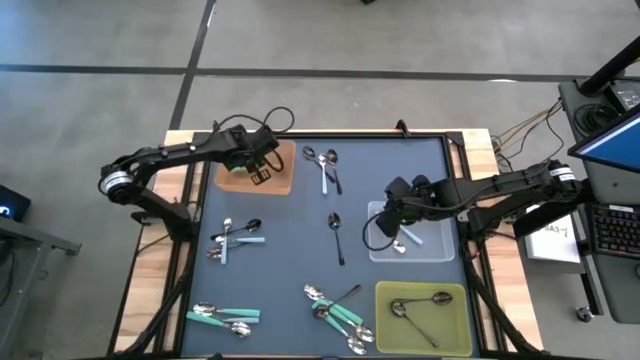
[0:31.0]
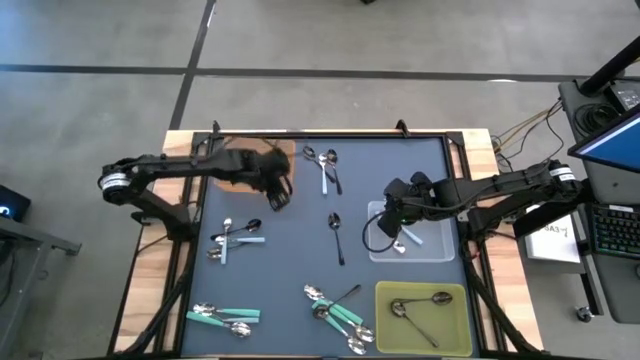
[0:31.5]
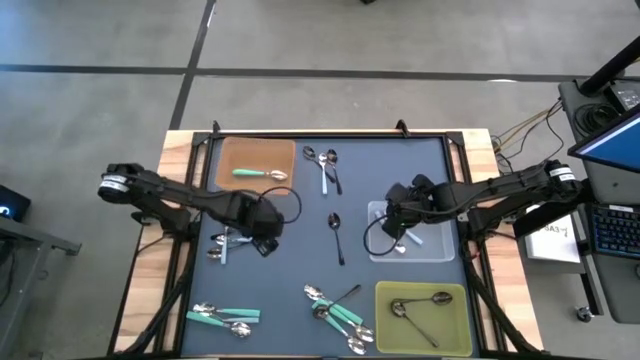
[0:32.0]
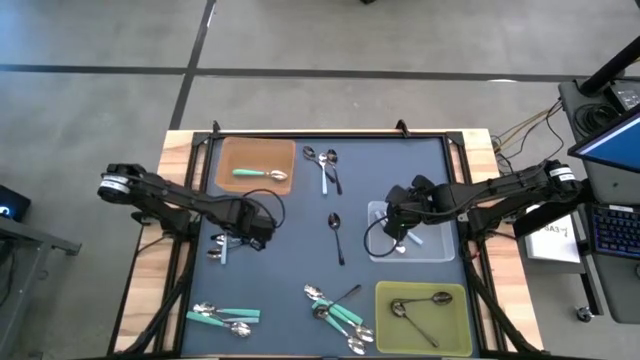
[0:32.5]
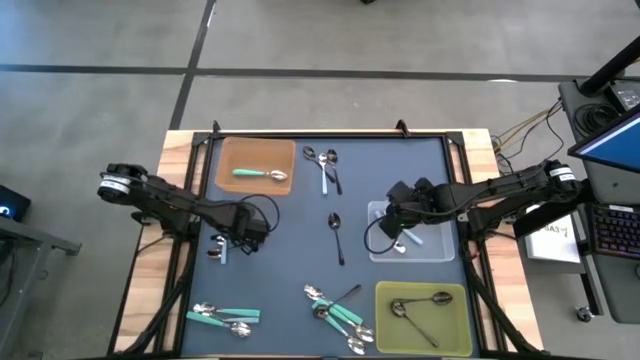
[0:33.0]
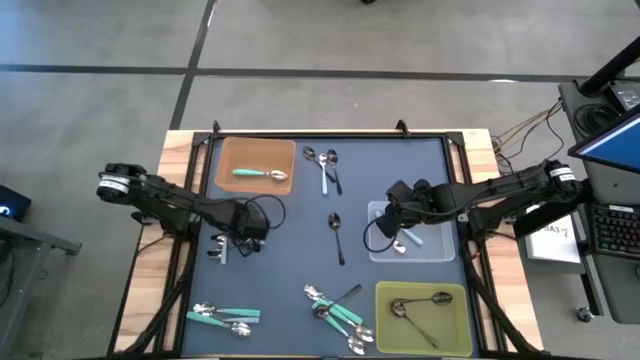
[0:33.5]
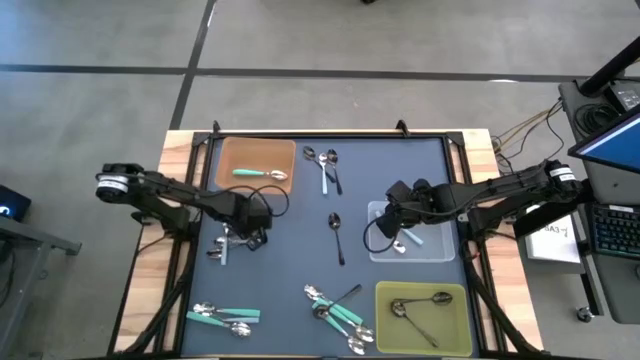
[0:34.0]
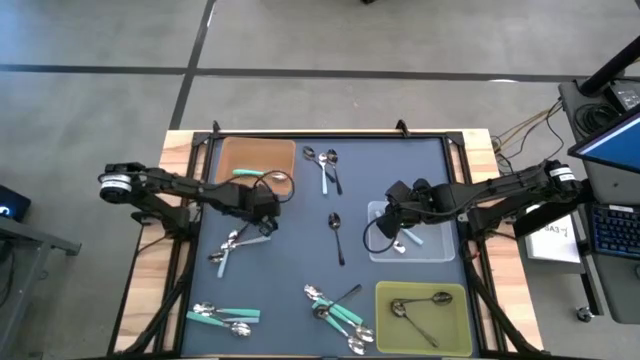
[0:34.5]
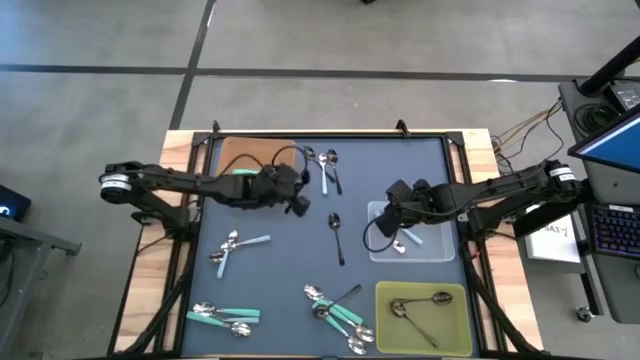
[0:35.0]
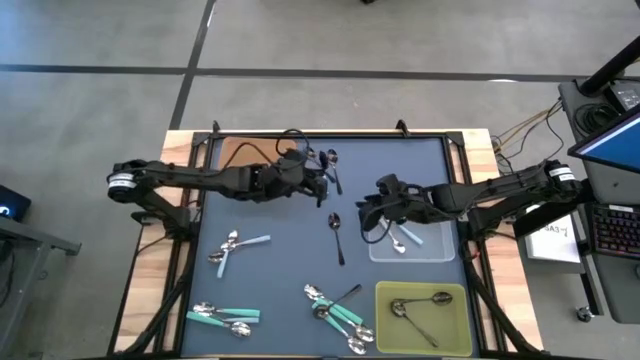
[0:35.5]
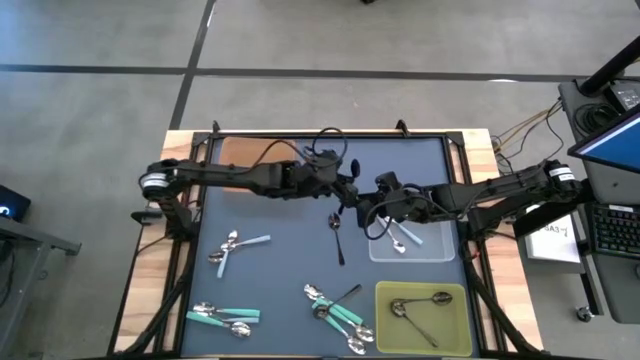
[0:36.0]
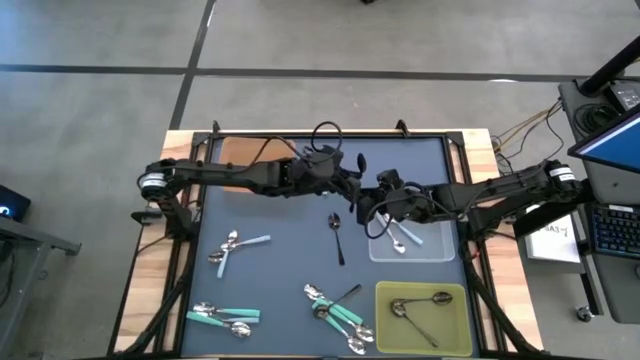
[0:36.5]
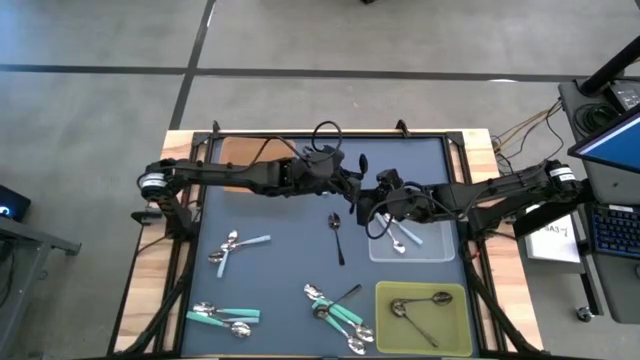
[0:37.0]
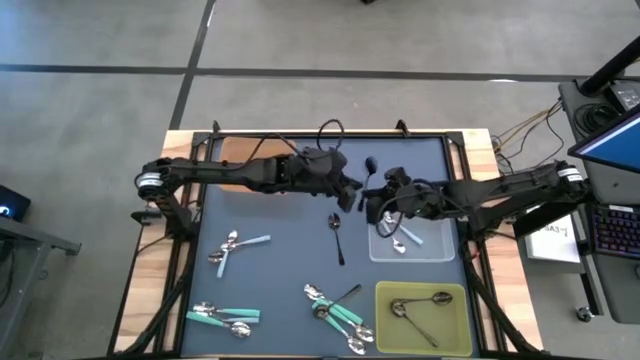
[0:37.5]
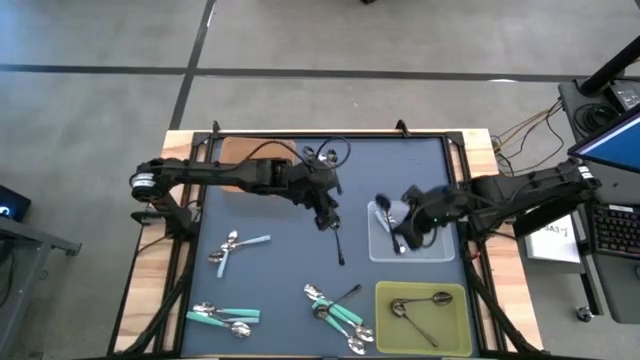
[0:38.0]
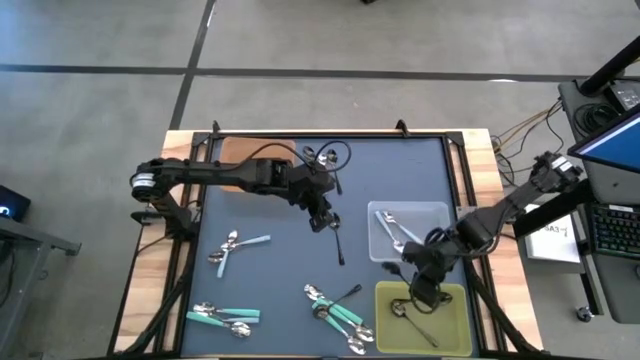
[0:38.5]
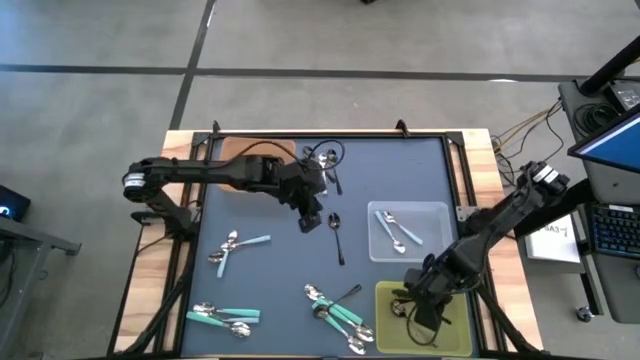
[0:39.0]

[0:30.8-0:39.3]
Task: Sort silverware by color (type)
Put the black spoon into the yellow bin

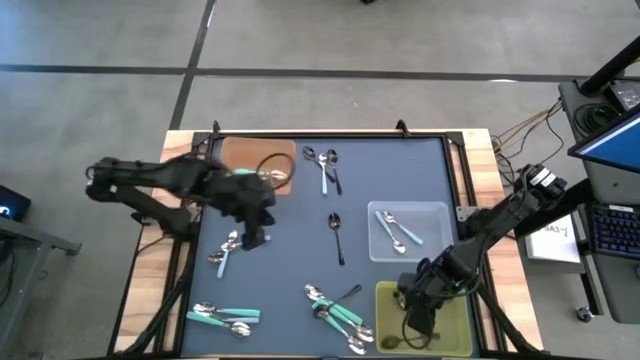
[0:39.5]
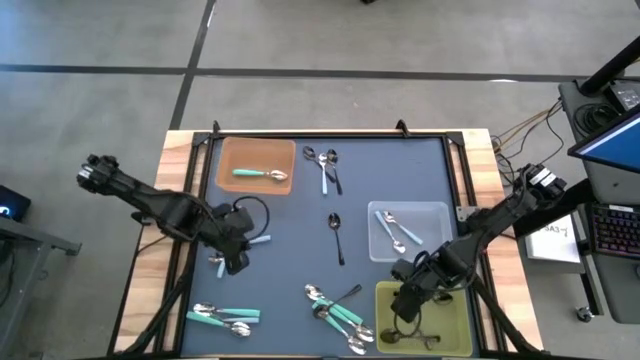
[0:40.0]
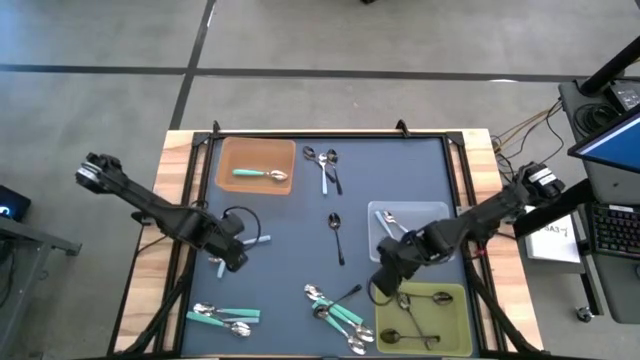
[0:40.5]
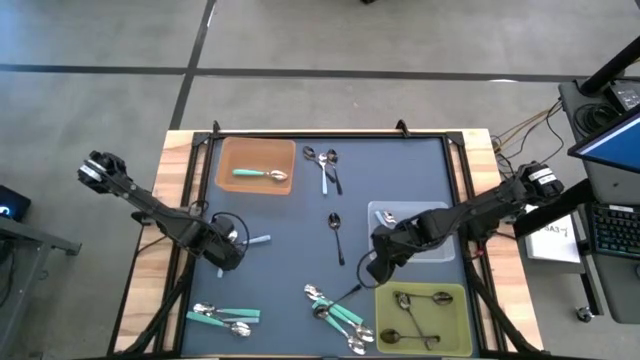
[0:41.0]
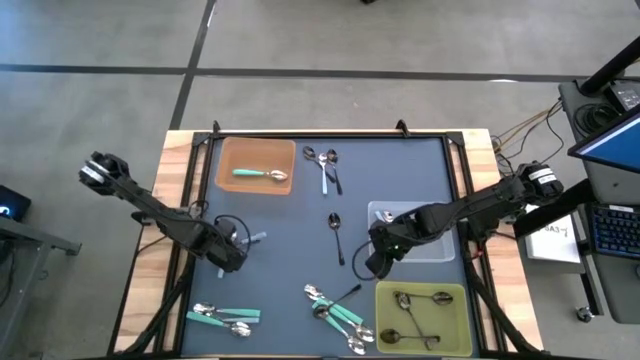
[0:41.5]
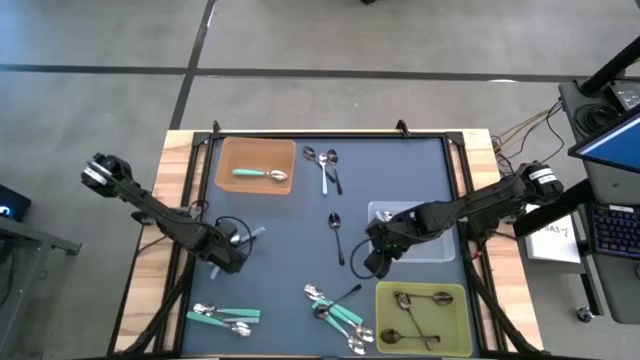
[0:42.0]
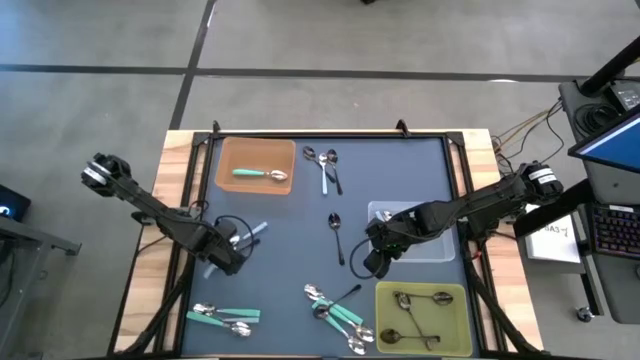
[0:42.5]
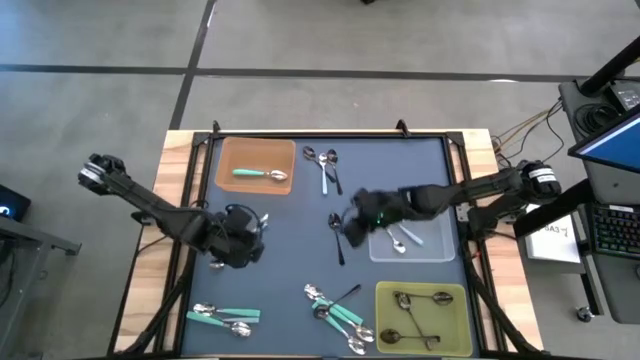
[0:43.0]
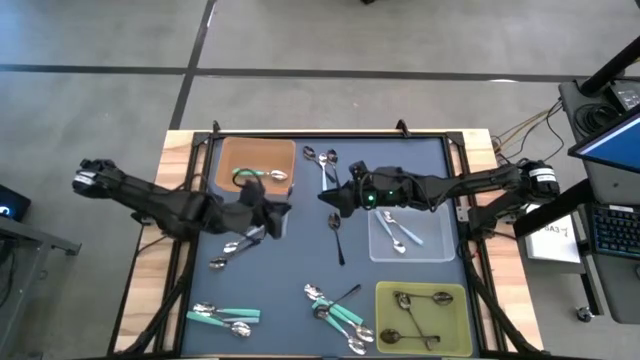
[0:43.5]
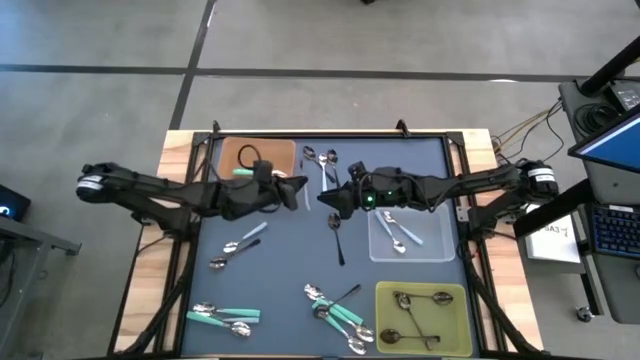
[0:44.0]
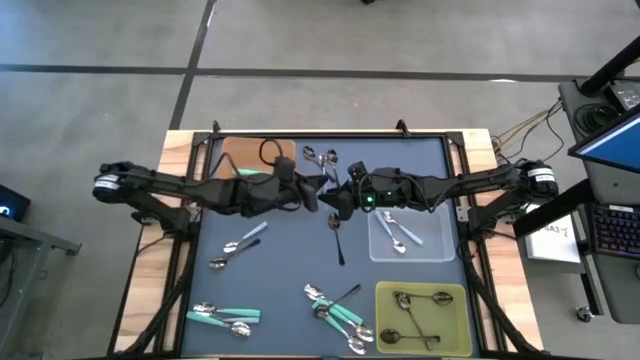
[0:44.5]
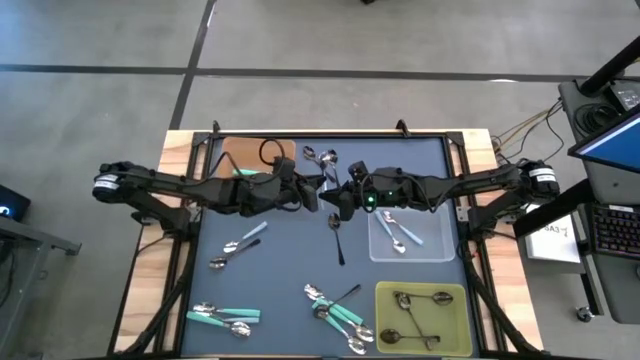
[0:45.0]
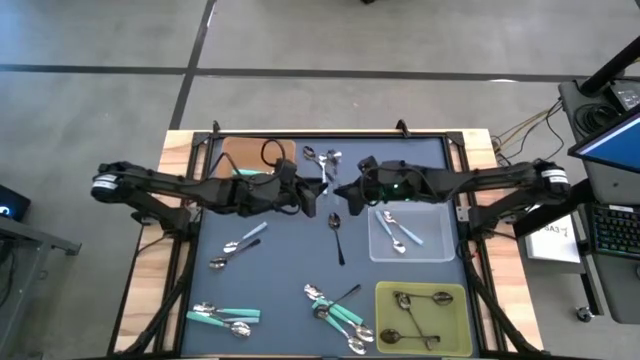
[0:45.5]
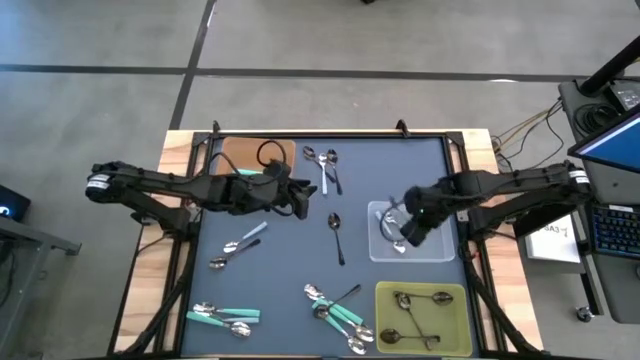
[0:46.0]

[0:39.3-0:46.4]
Put the white spoon into the transparent bin

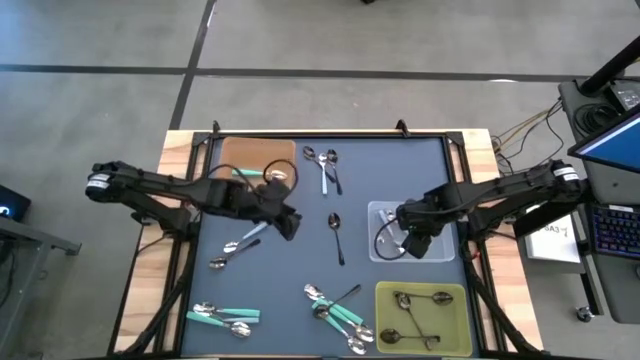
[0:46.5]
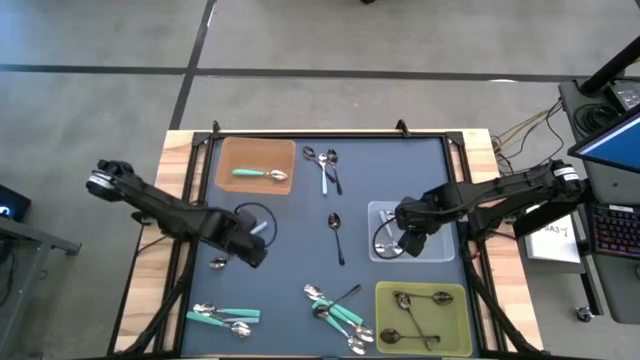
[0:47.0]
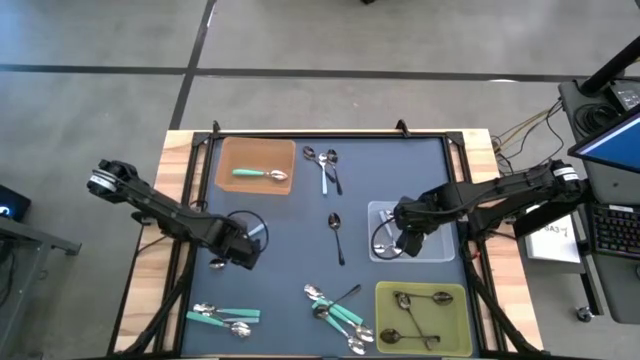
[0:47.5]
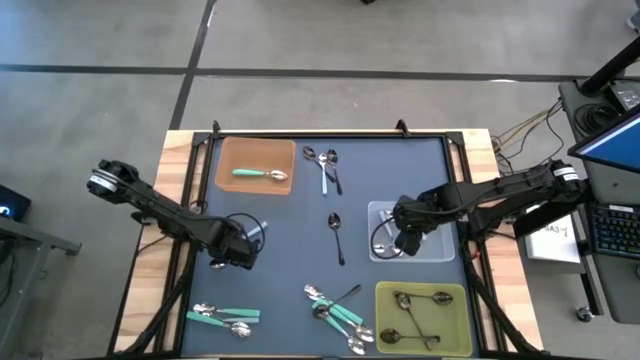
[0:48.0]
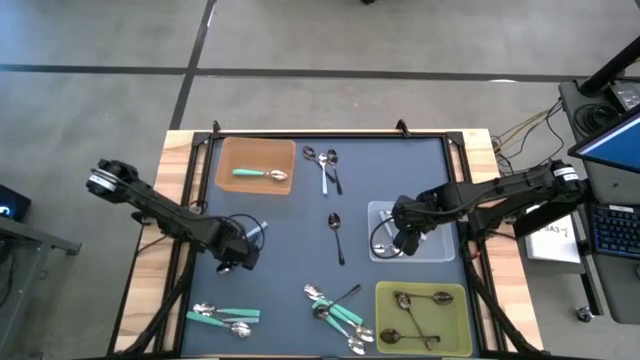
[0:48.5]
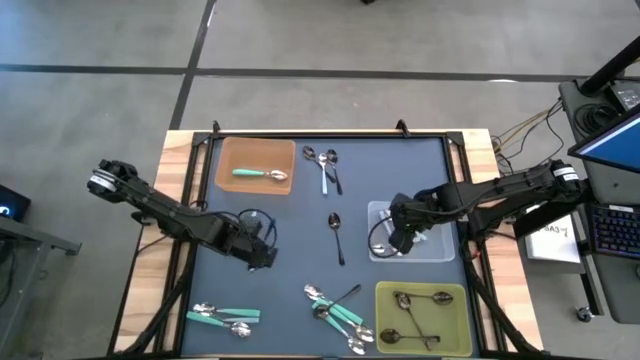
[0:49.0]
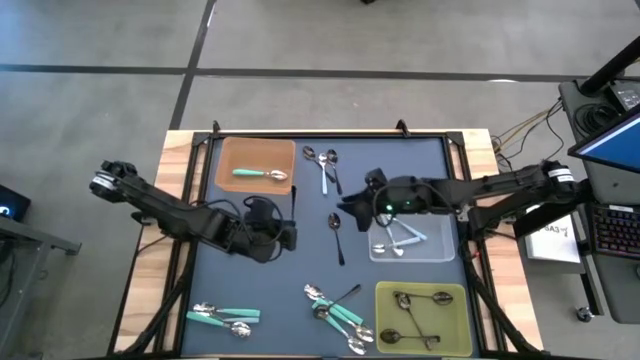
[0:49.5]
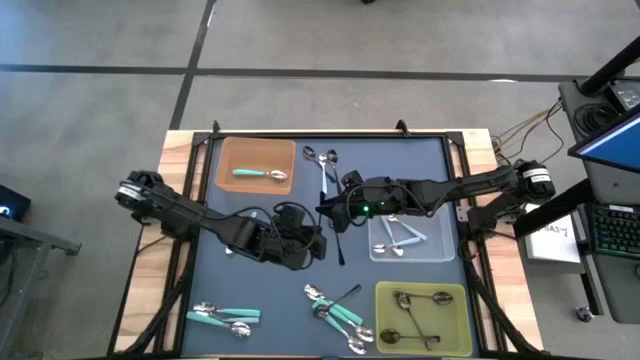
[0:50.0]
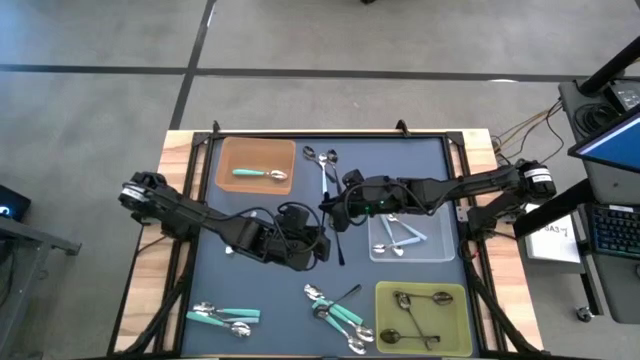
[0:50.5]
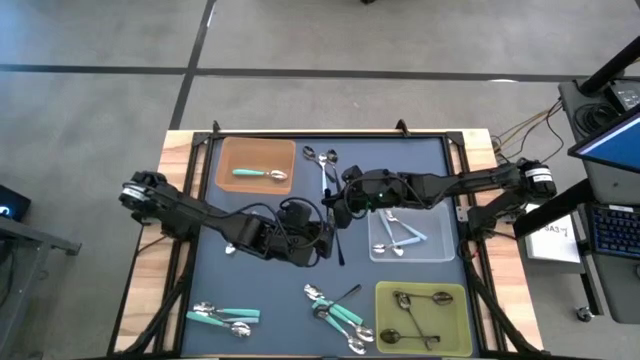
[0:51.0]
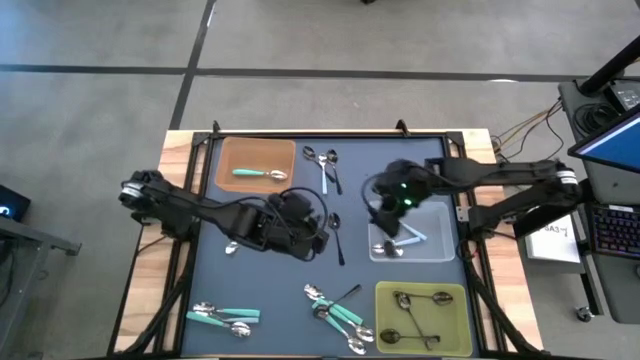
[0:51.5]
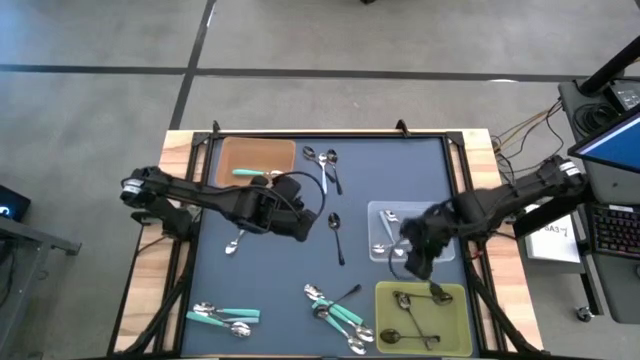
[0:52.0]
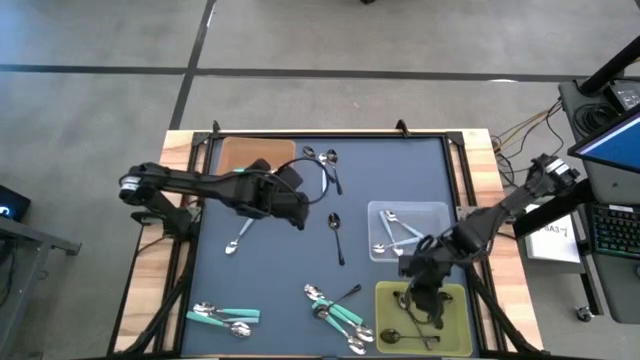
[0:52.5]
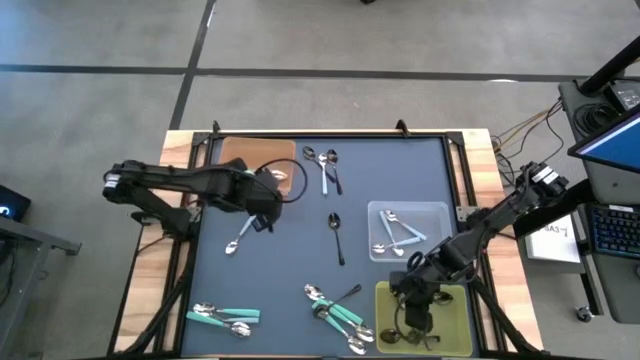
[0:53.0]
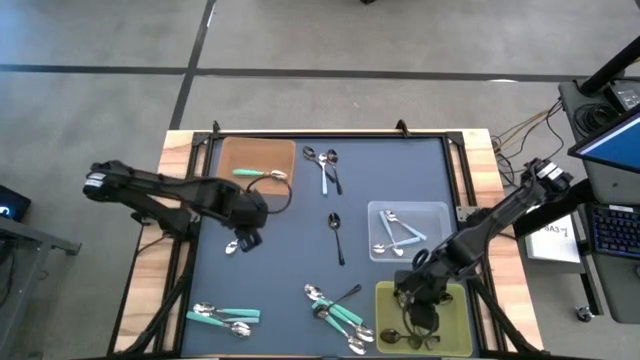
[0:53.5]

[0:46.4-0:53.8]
Put the black spoon into the yellow bin
